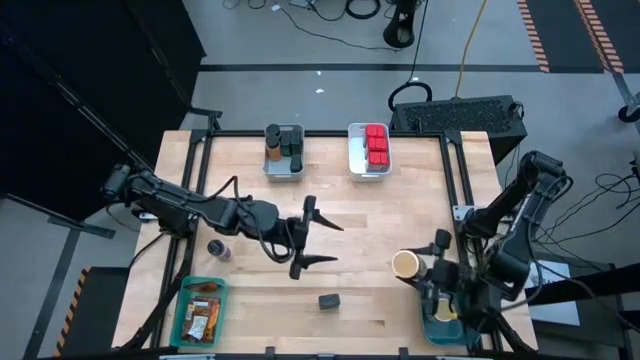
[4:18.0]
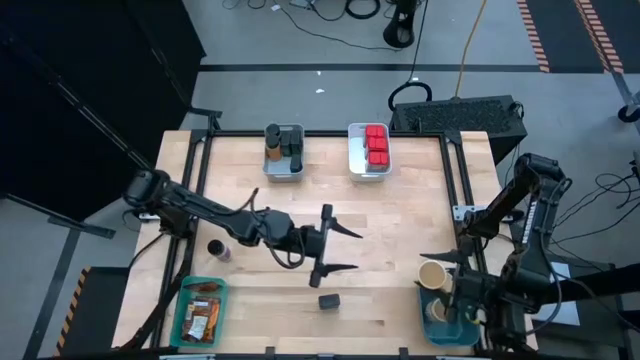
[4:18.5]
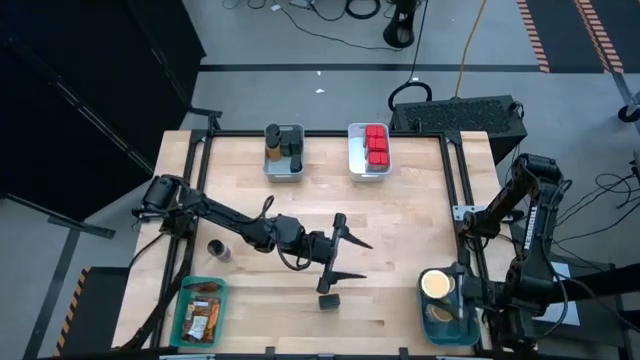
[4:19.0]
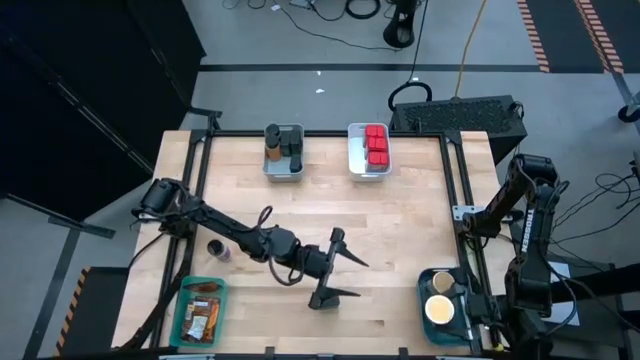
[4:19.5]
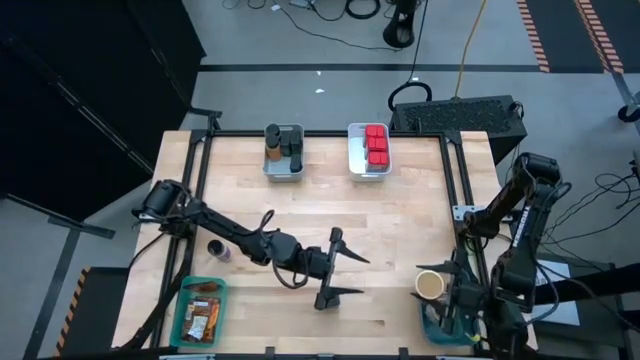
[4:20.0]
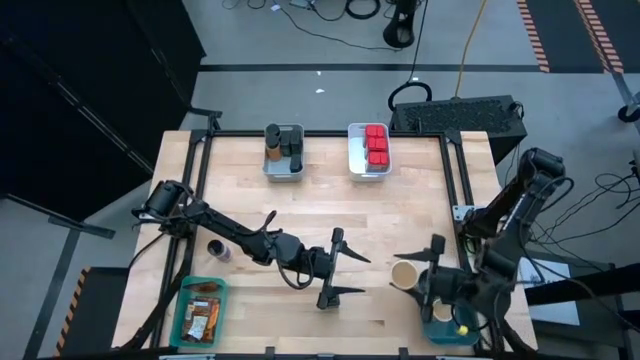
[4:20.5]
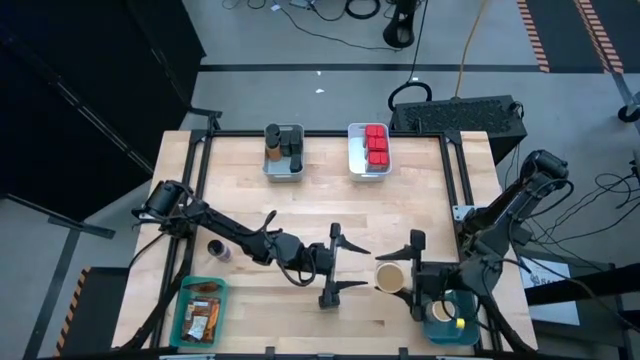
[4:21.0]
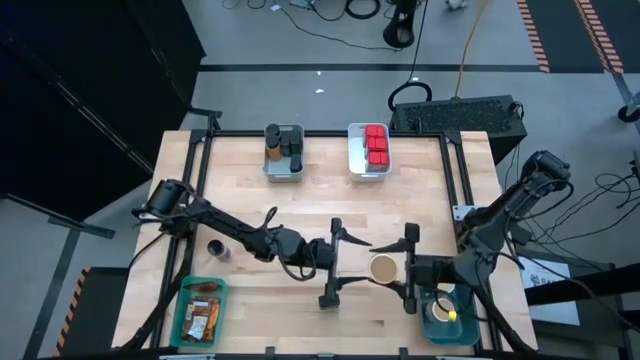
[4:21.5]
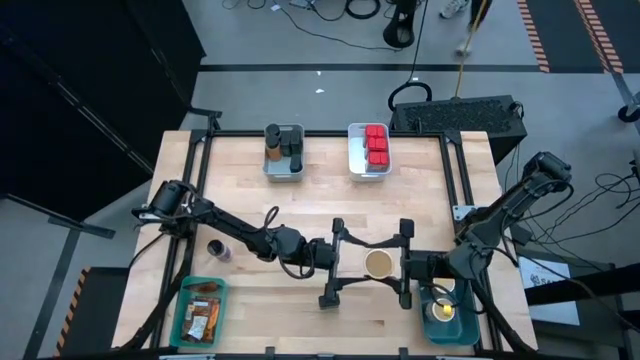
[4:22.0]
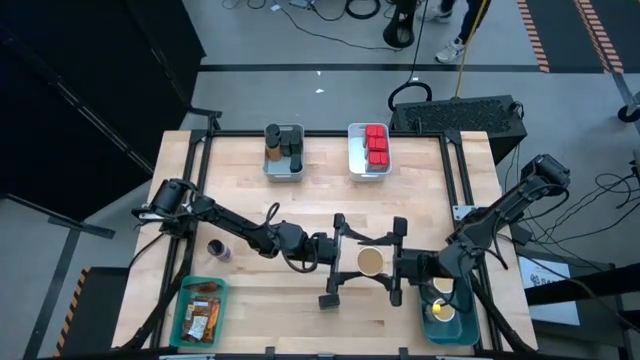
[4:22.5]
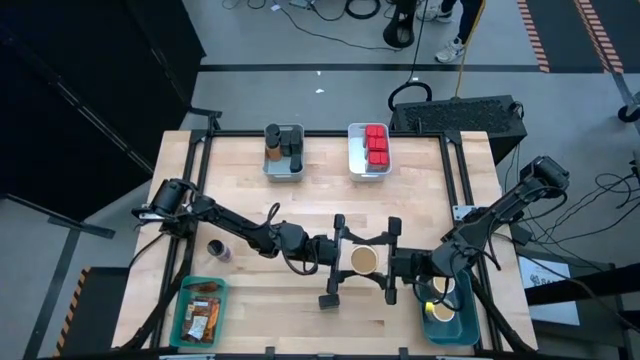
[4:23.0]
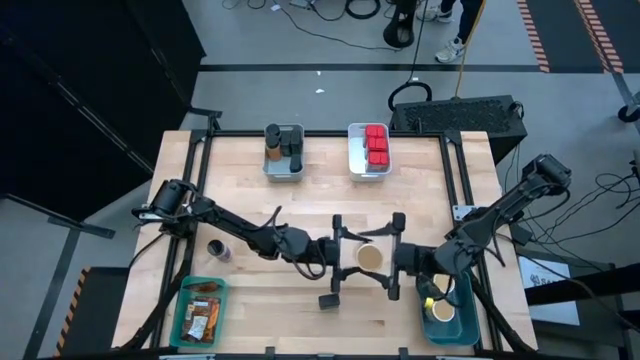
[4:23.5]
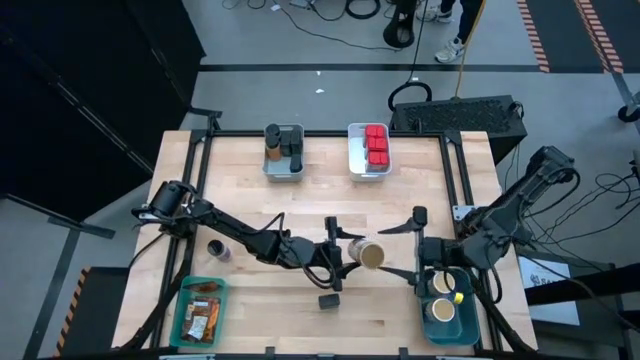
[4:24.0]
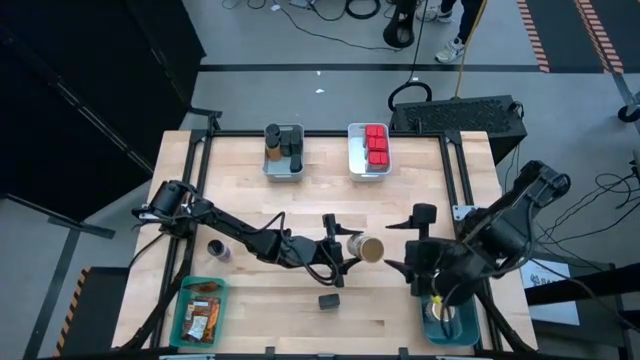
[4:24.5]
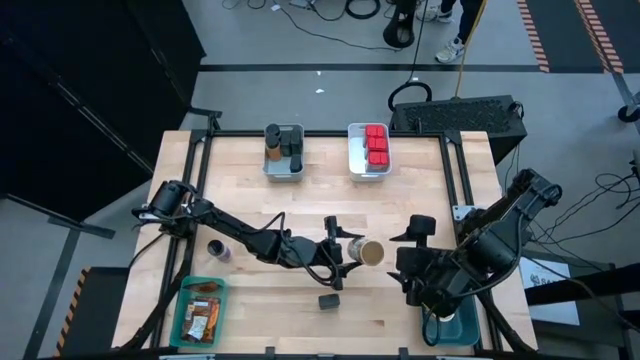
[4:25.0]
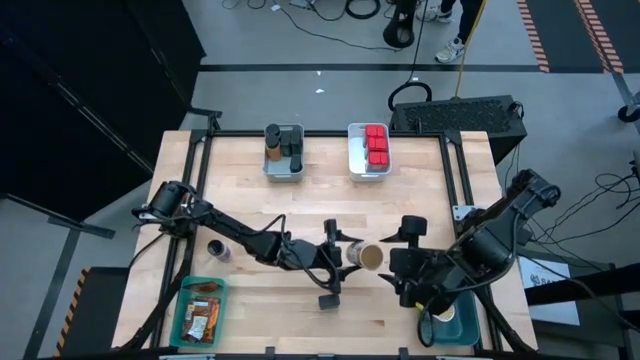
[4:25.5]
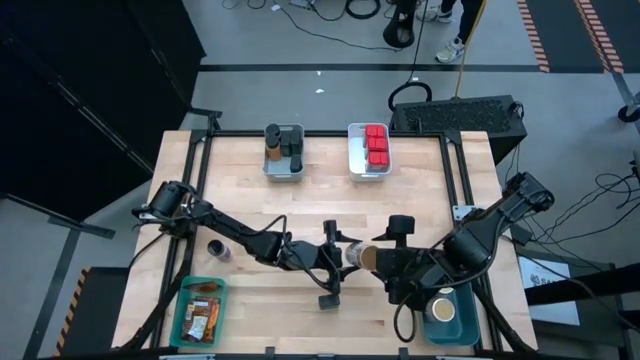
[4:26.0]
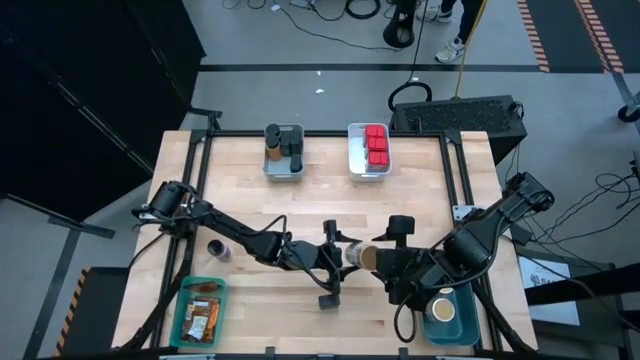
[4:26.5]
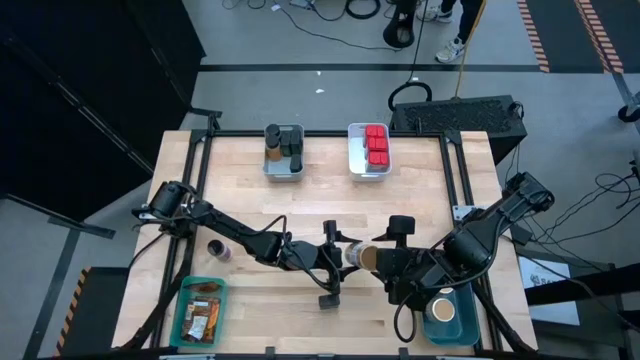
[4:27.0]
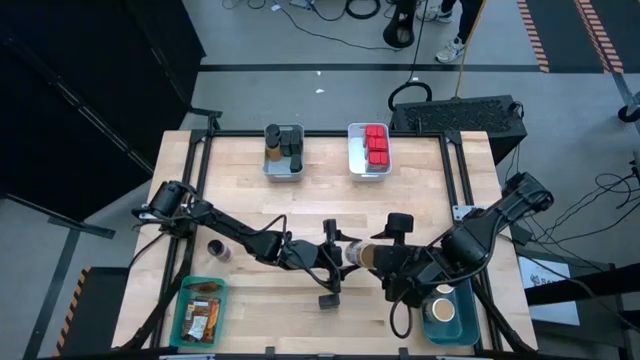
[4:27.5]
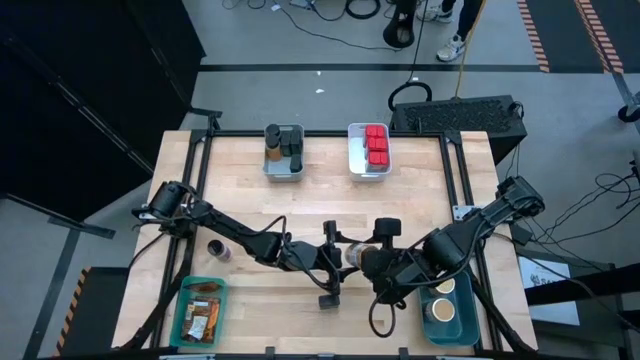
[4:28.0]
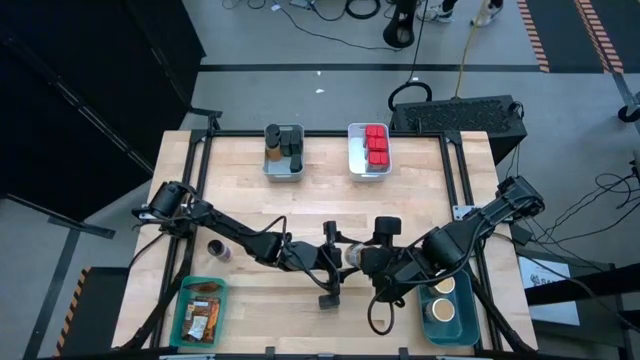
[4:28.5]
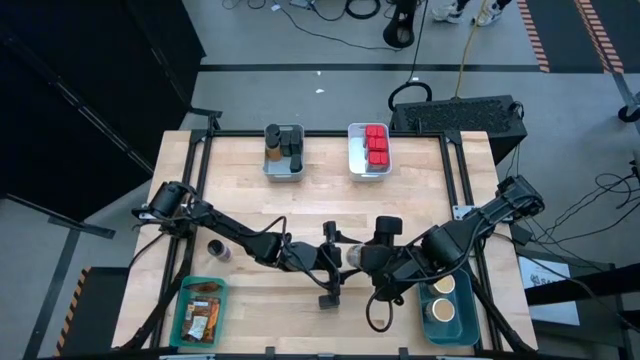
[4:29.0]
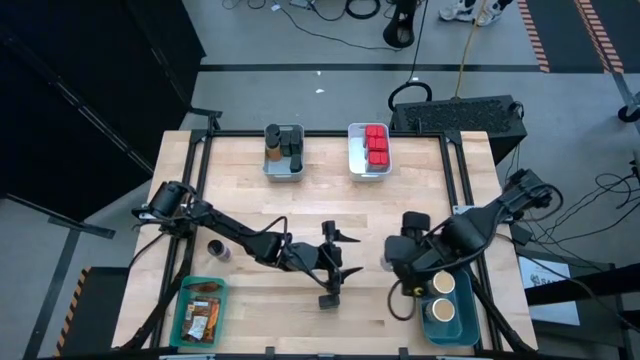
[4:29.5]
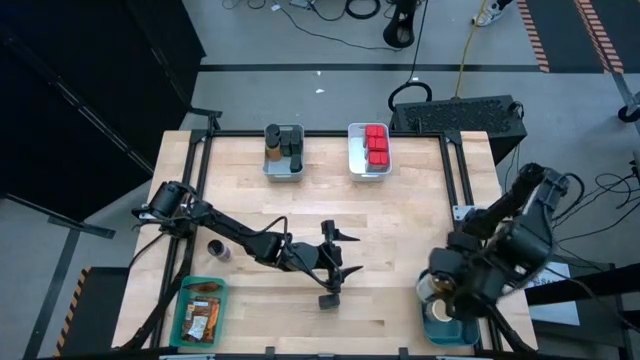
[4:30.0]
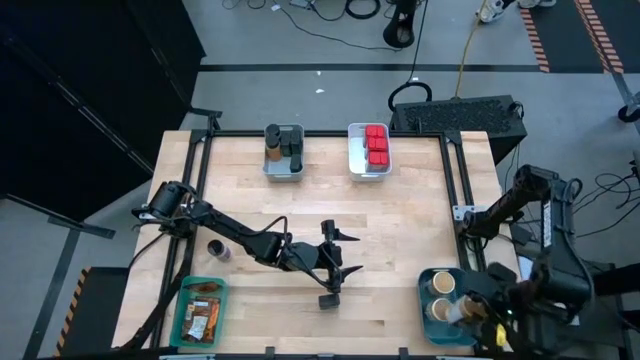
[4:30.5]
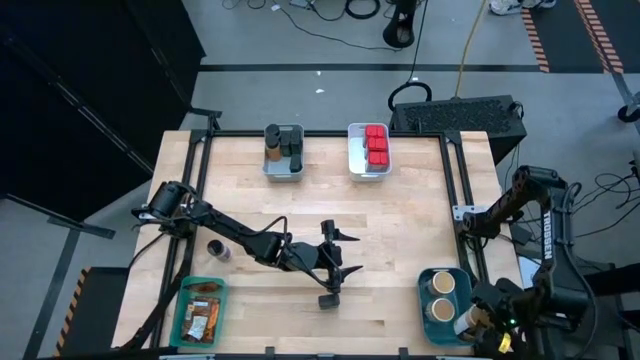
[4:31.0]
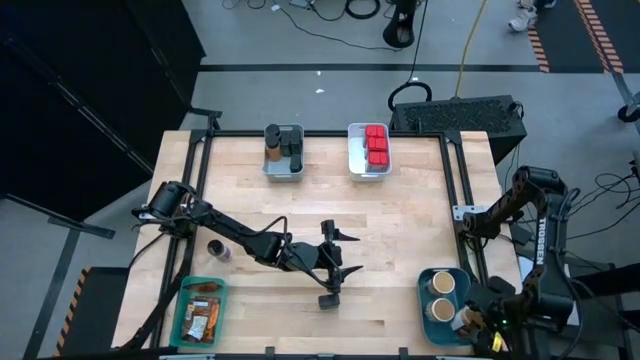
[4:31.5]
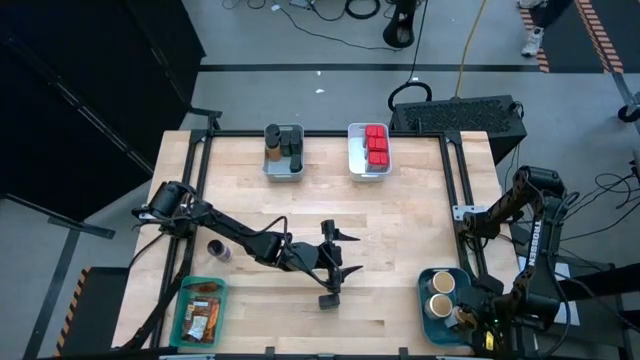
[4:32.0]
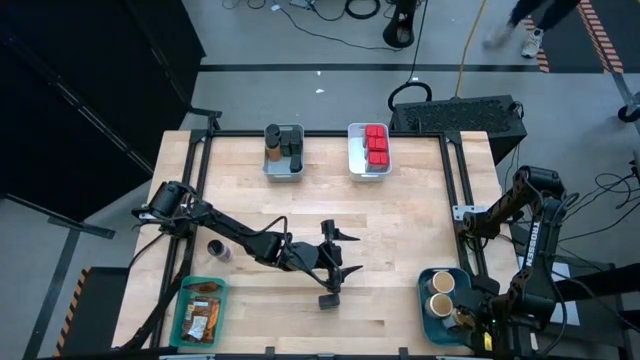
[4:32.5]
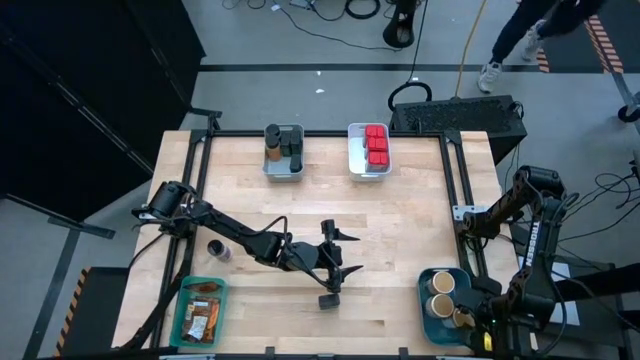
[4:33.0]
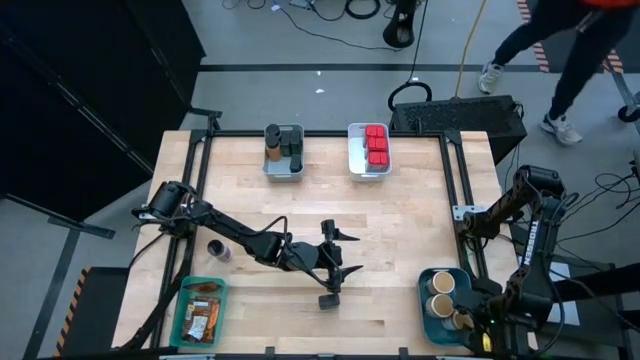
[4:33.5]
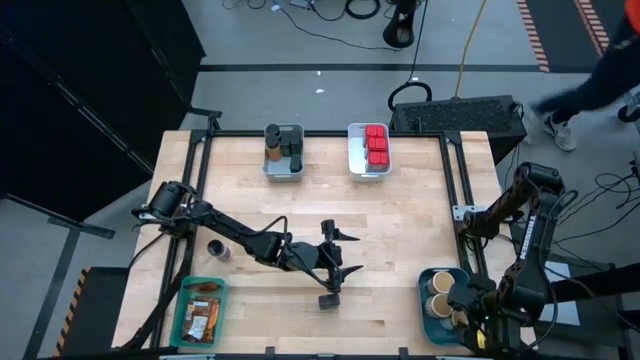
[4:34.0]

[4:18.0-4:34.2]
Task: Sort spices by type
Put the gold spice bottle into the blue bin

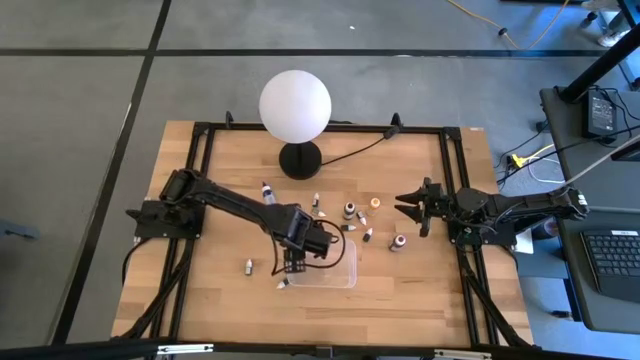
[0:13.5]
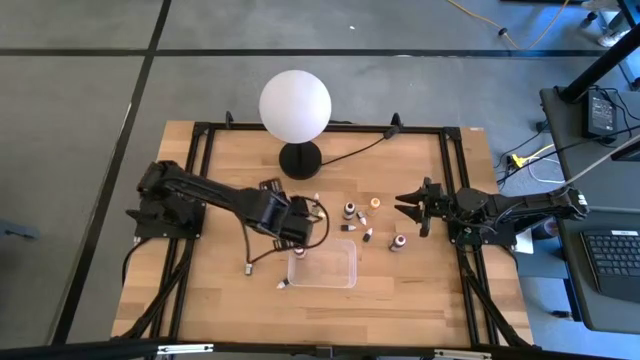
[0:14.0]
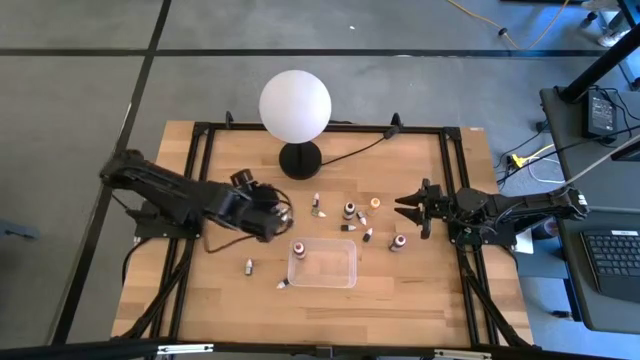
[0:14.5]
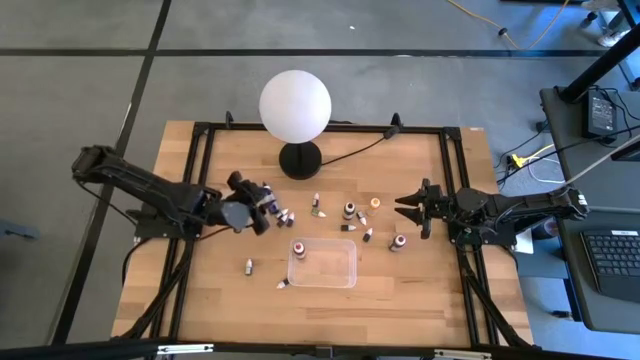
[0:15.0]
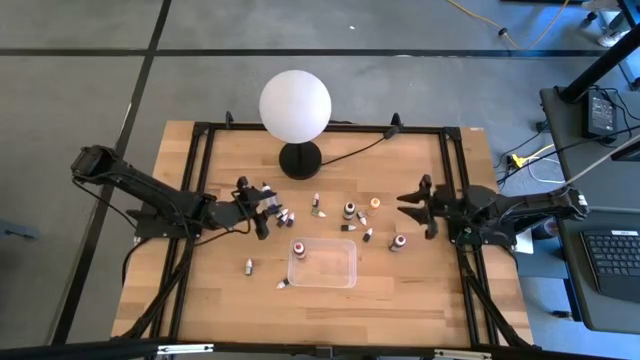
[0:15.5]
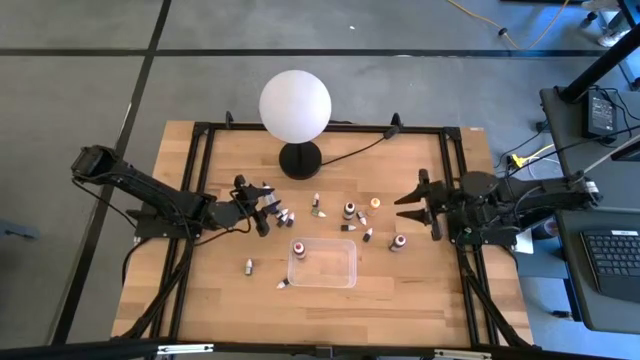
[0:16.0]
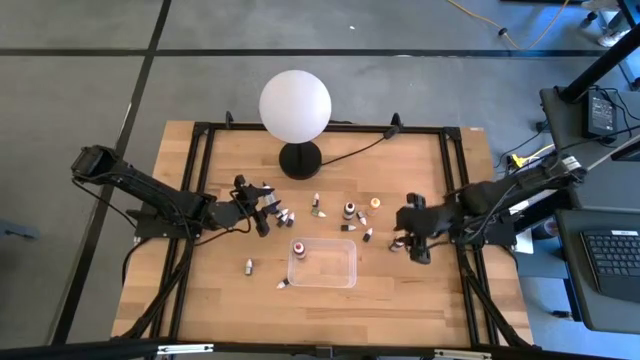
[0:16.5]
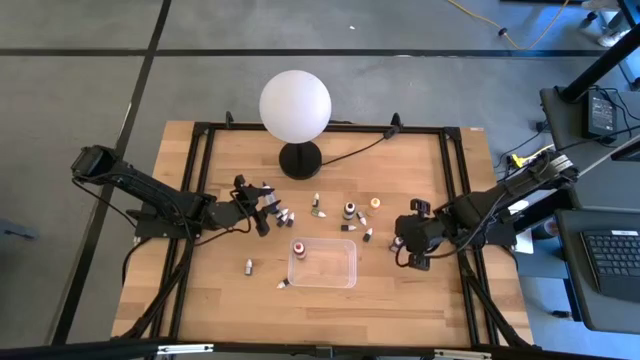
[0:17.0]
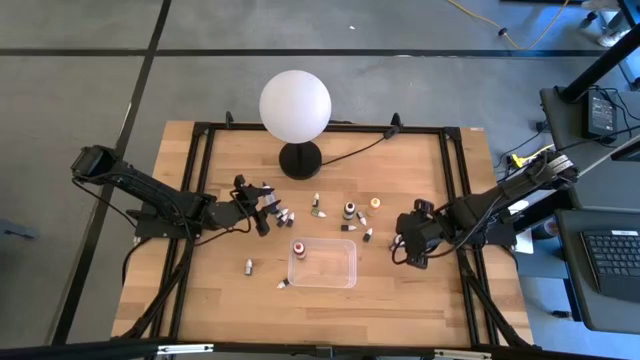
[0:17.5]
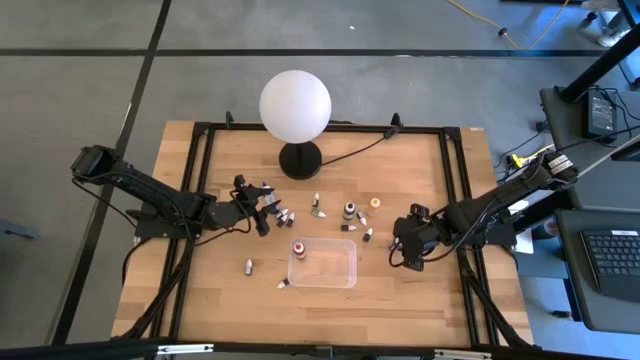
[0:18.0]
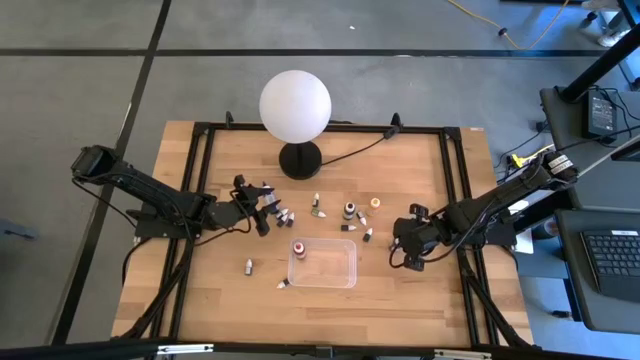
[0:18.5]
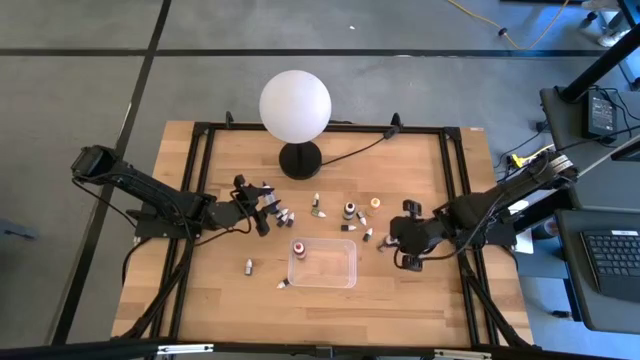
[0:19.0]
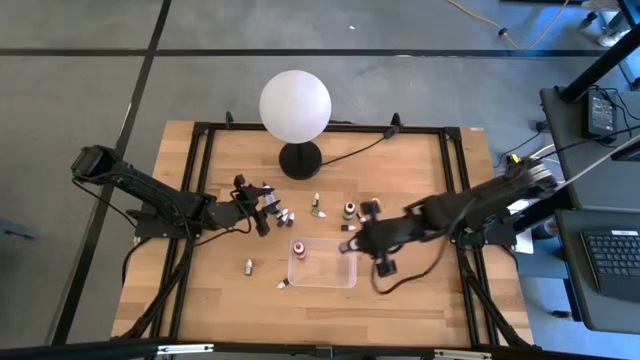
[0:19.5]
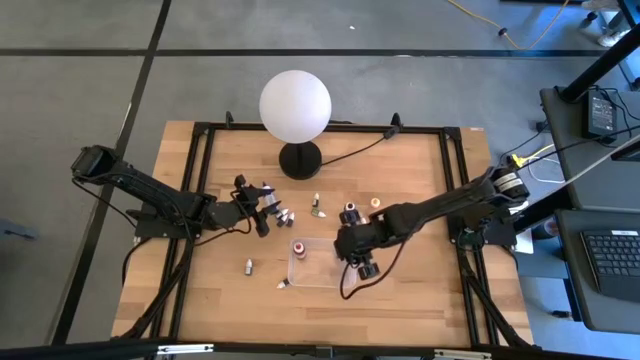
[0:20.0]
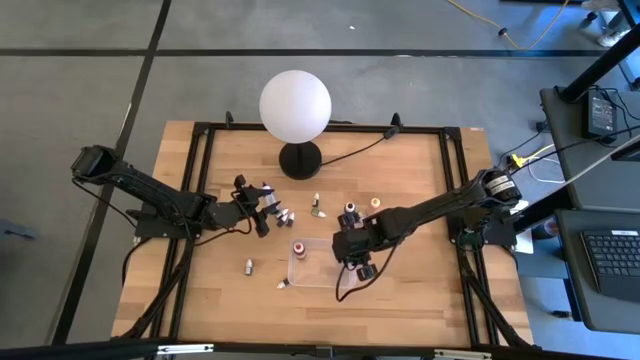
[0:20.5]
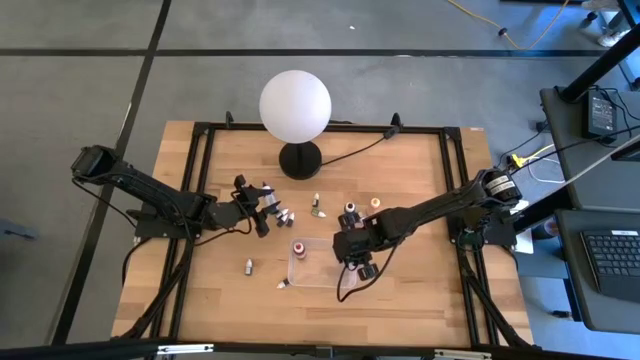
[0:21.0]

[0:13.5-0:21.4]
Task: Pick & Place food coloring
Put the large violet food coloring bottle into the transparent bin
